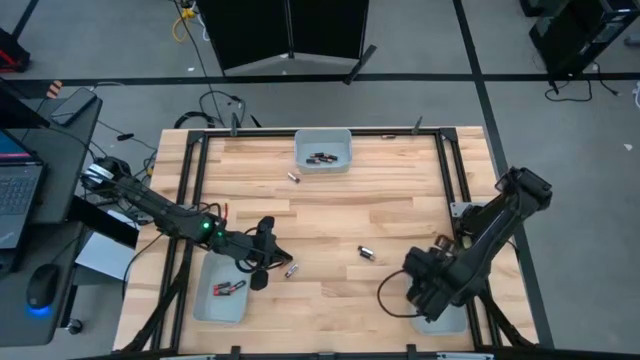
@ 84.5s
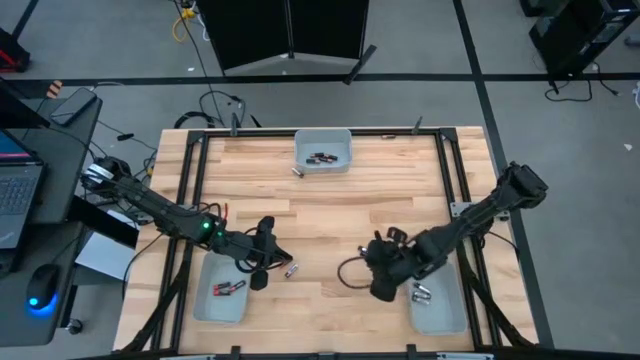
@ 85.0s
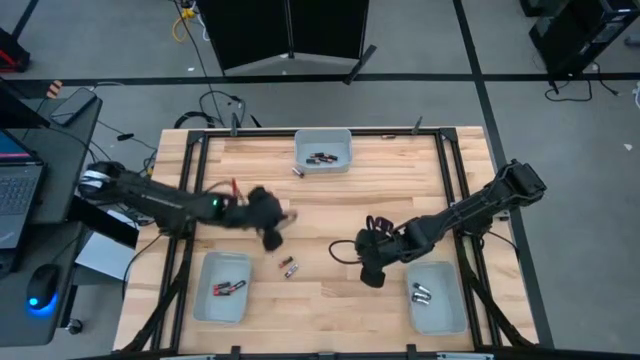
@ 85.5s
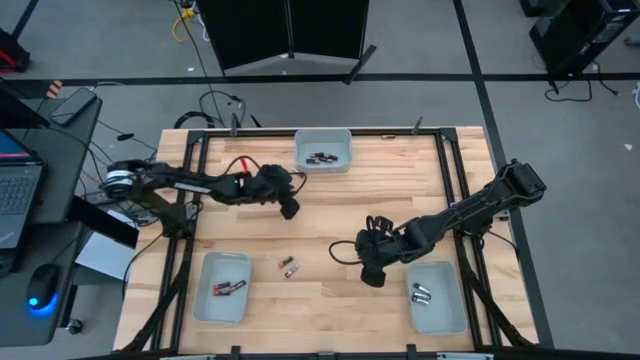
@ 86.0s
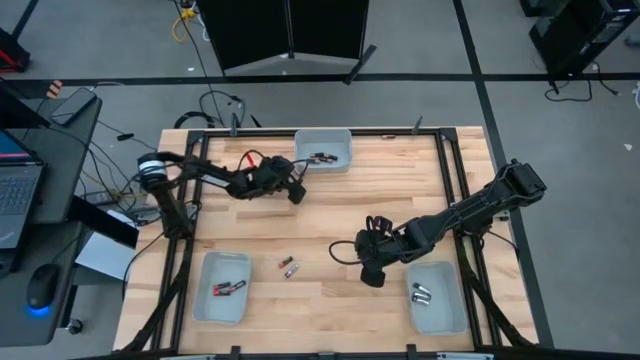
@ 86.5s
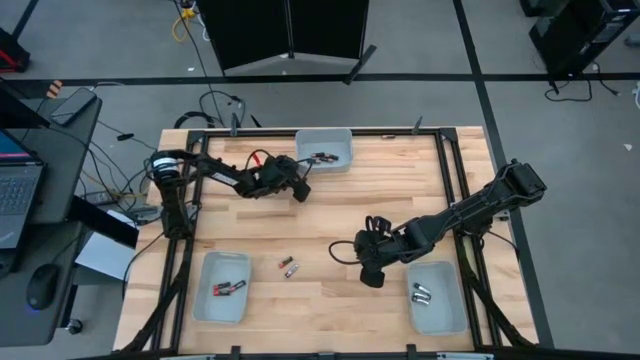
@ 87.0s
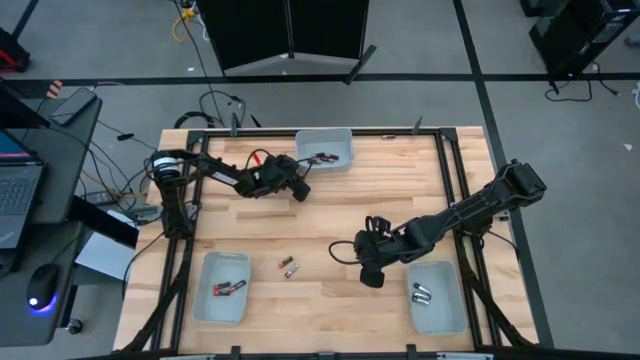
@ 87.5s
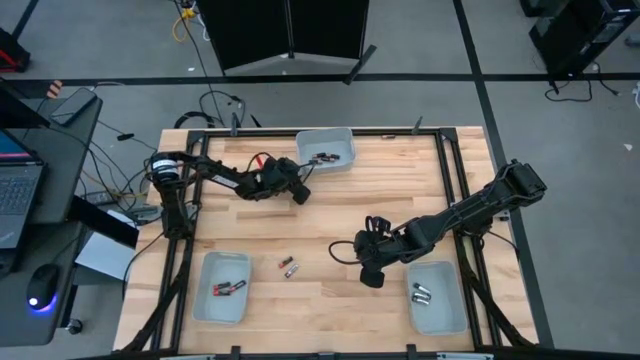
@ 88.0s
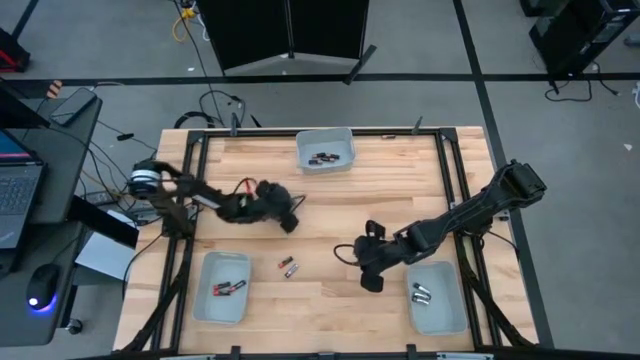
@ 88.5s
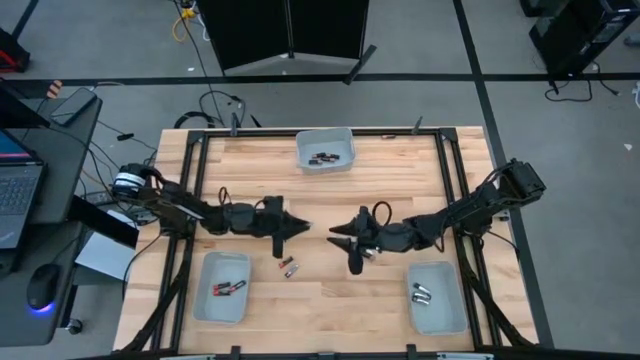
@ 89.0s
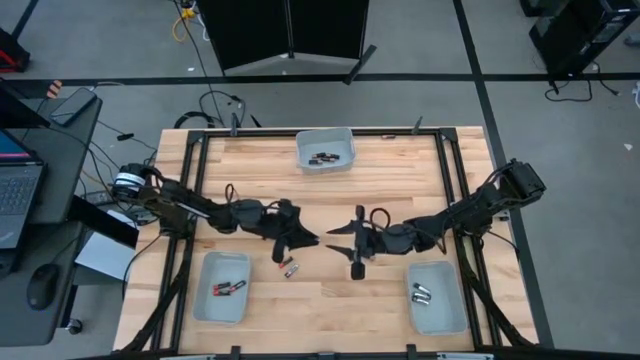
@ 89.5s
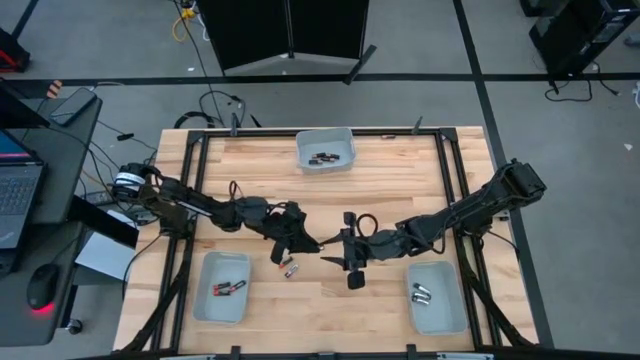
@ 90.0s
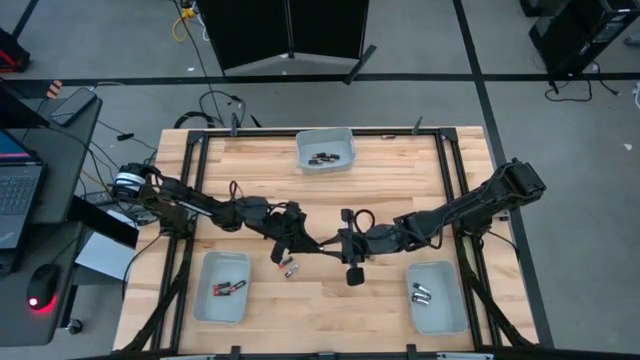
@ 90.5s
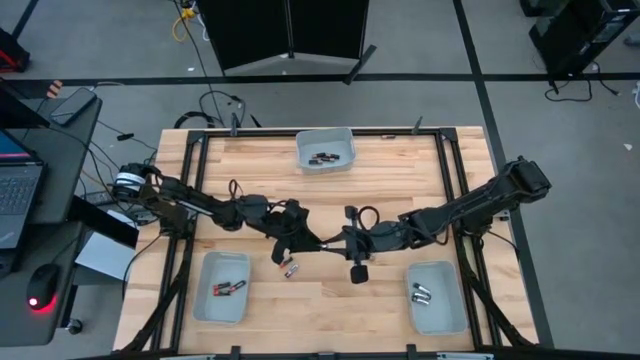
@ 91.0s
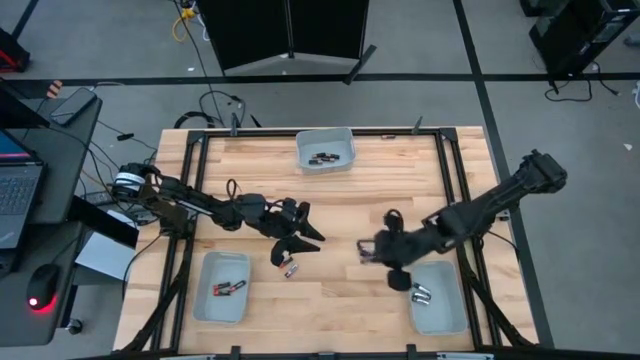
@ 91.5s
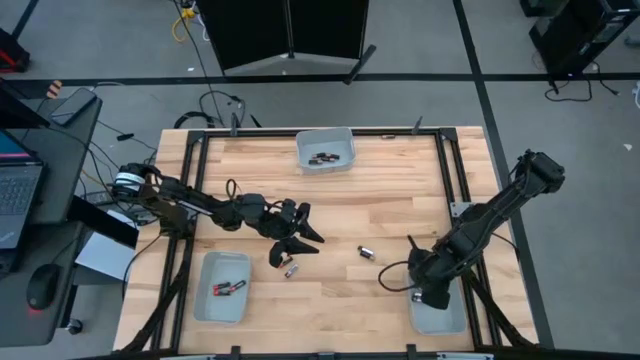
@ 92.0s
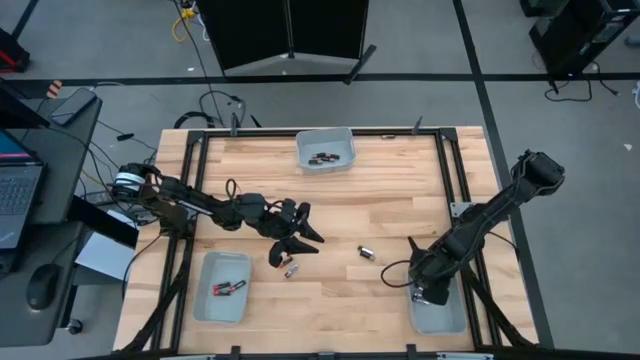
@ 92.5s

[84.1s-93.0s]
Task: Sort batteries
Put the silver battery into the bottom right gray bin

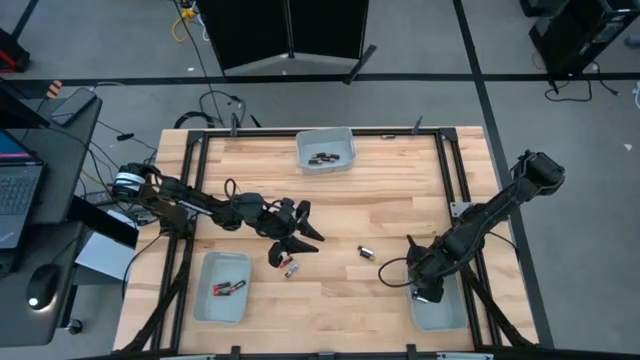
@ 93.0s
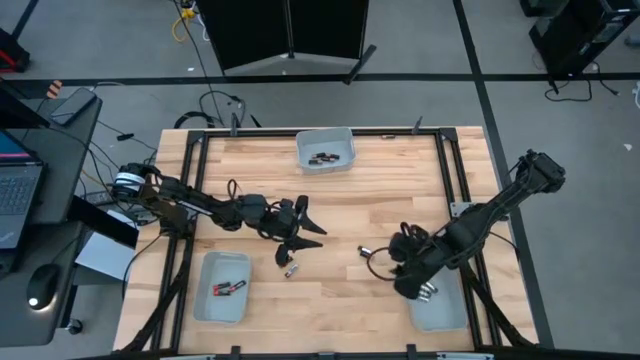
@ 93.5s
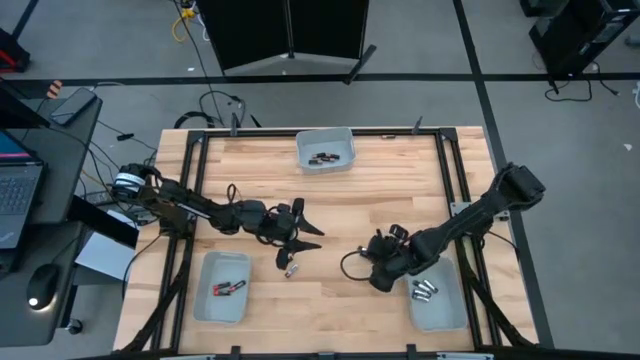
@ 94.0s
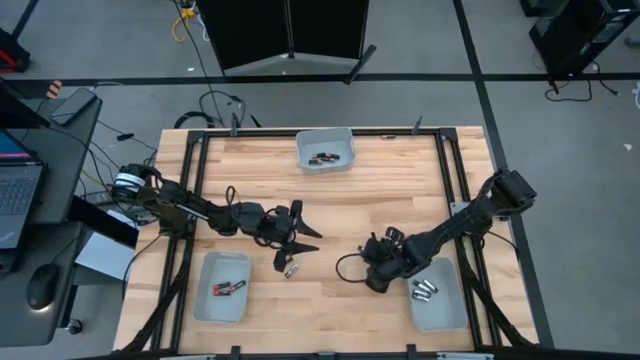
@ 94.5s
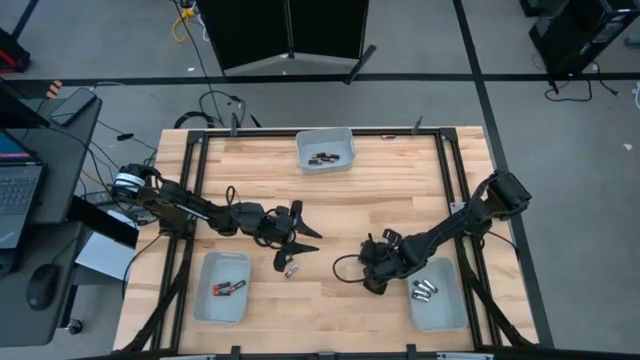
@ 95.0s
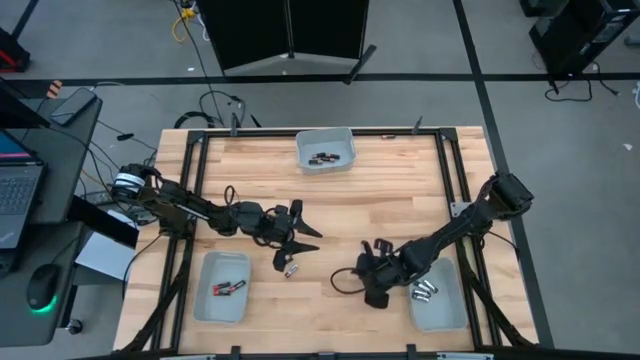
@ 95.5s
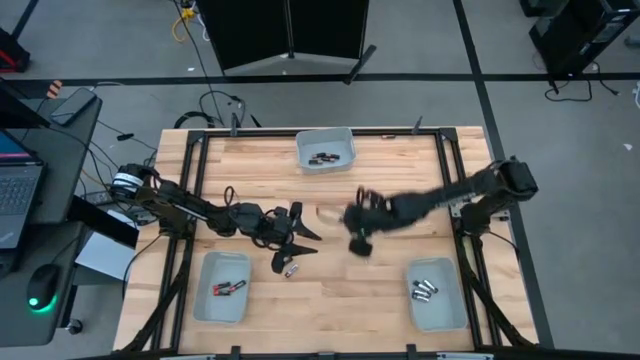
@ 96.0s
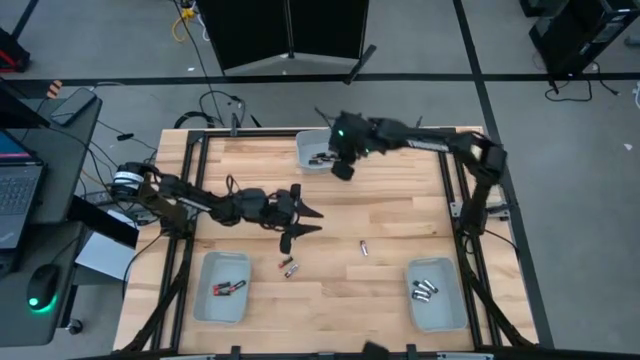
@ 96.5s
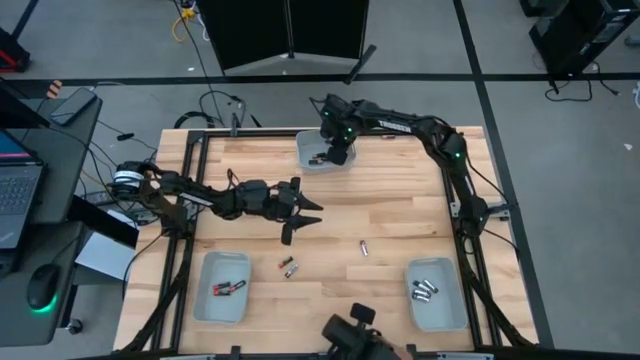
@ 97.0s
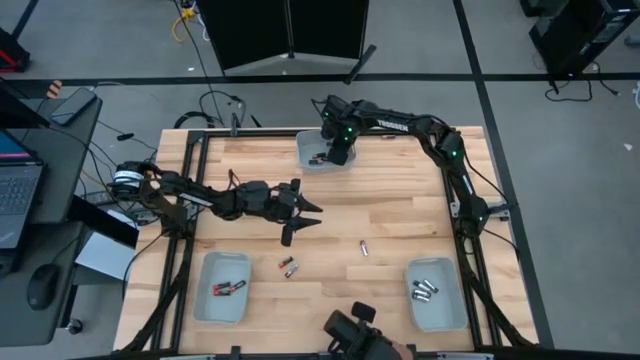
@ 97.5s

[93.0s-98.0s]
Put the copper battery into the top gray bin

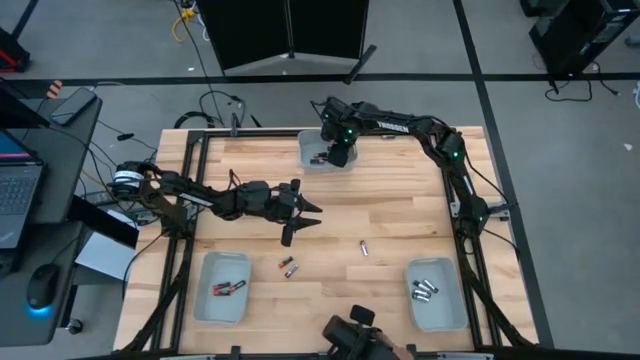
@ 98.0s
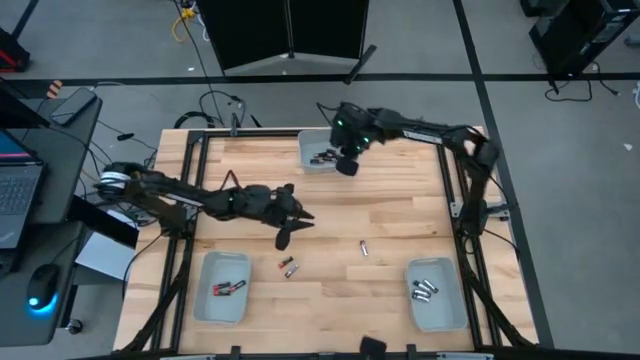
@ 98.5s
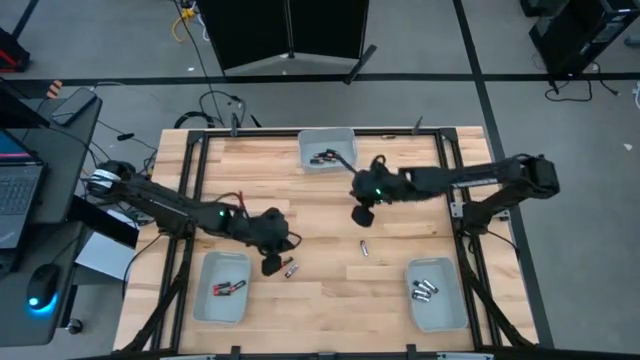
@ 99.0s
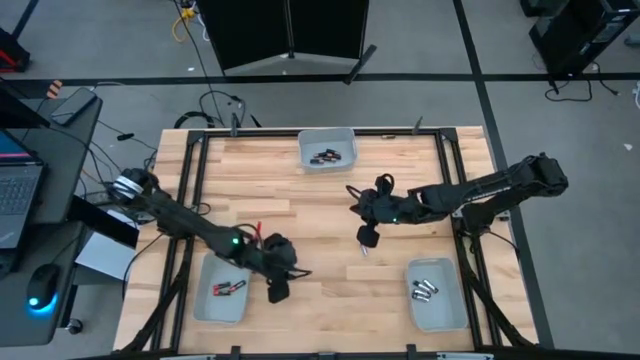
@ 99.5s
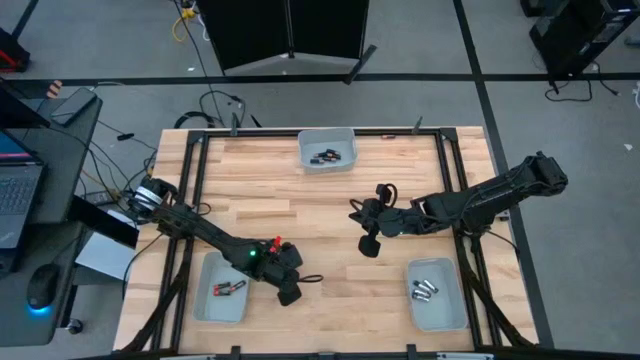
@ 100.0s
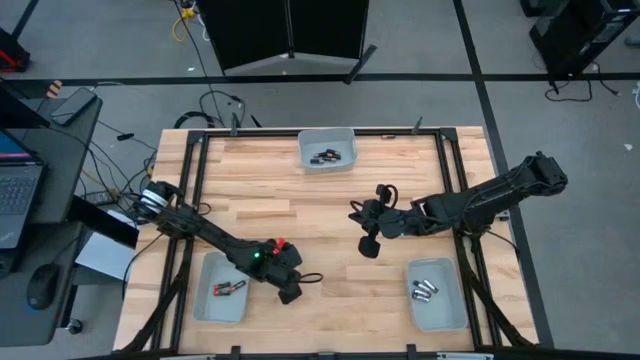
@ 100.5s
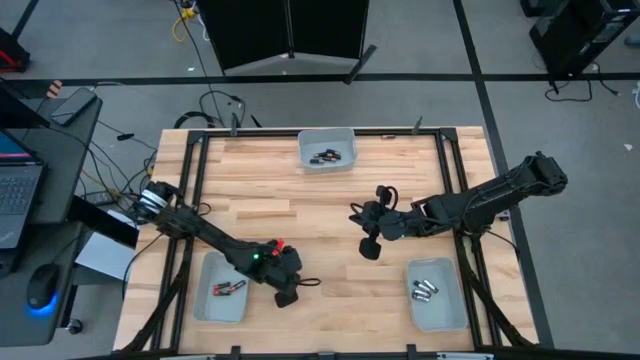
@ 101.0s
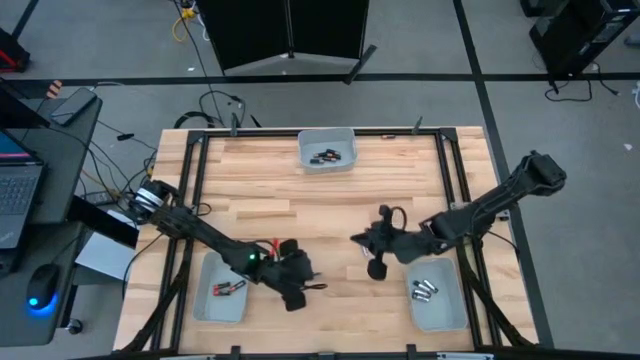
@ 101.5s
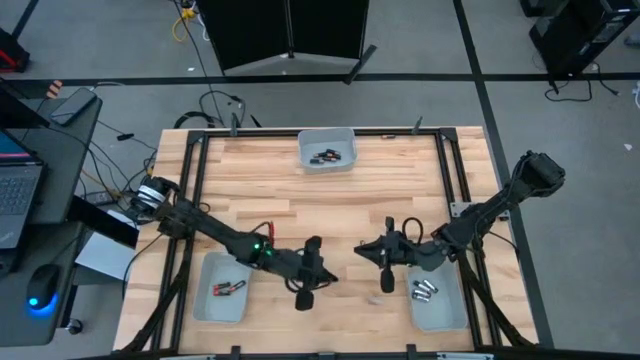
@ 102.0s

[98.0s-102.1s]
Put the silver battery into the bottom right gray bin

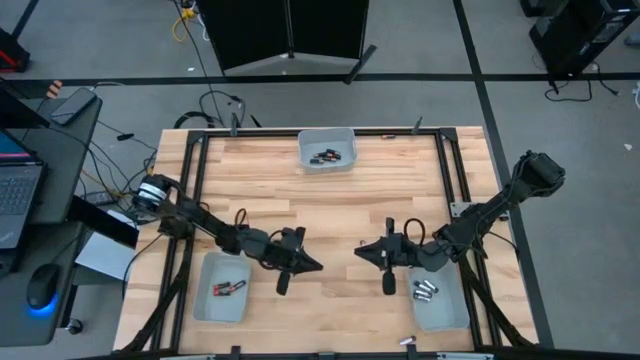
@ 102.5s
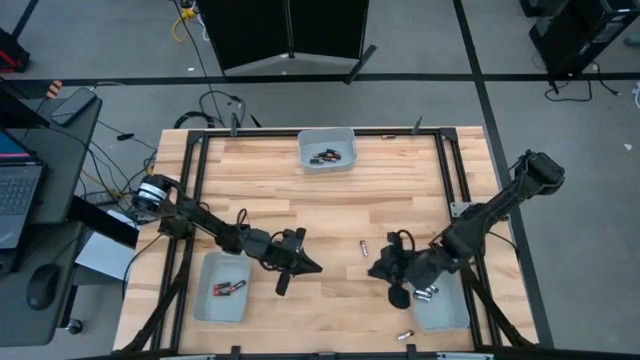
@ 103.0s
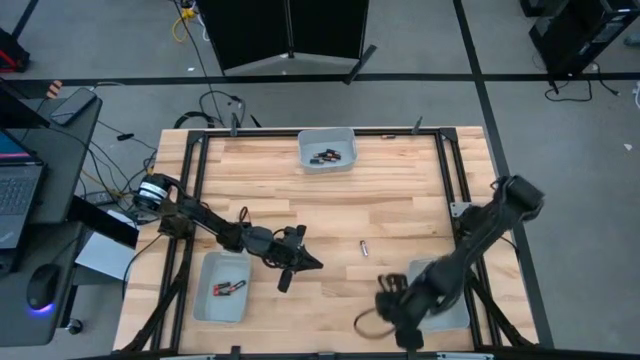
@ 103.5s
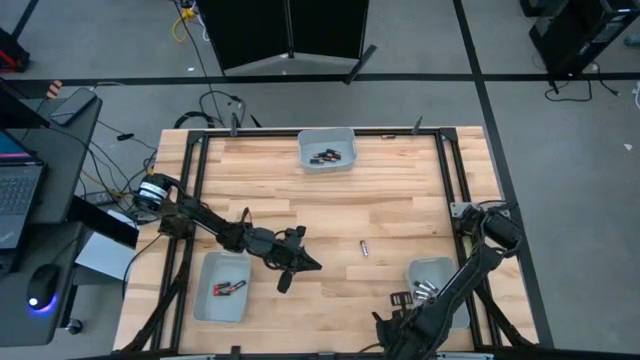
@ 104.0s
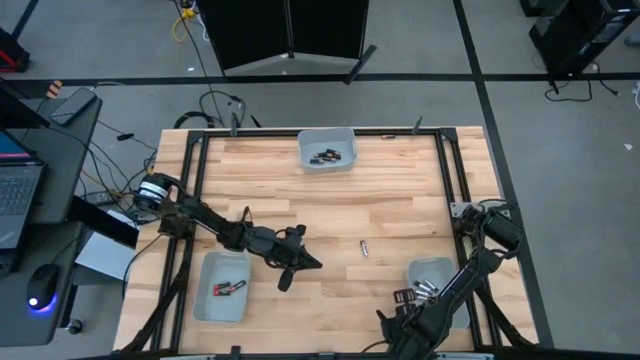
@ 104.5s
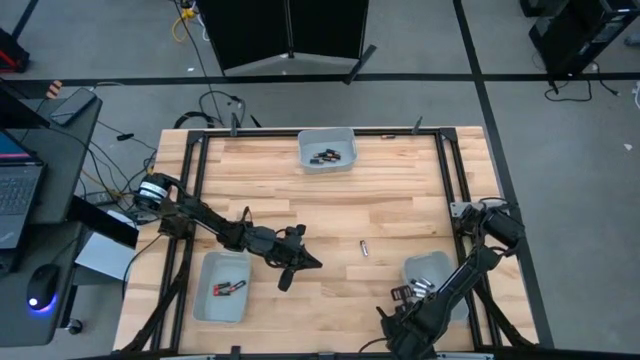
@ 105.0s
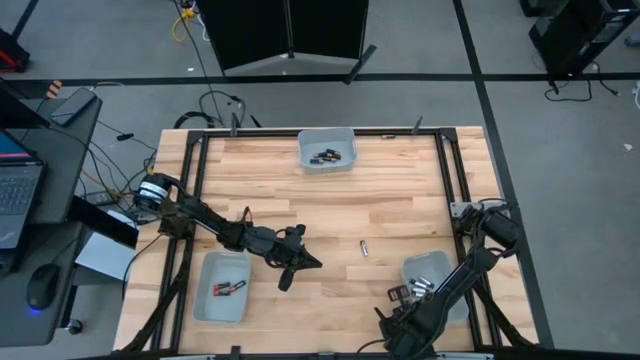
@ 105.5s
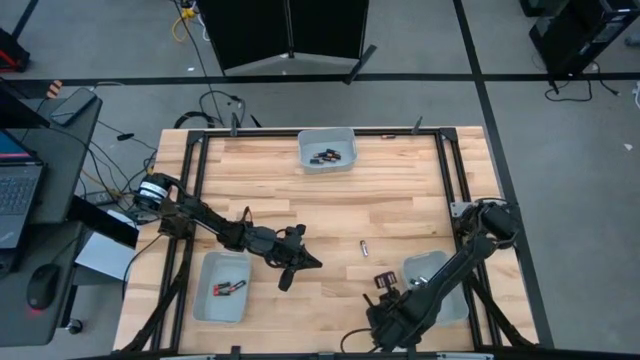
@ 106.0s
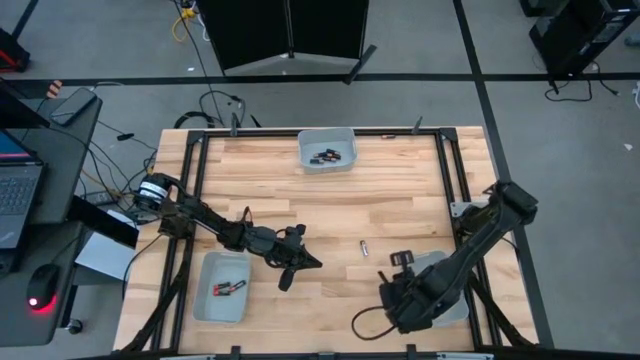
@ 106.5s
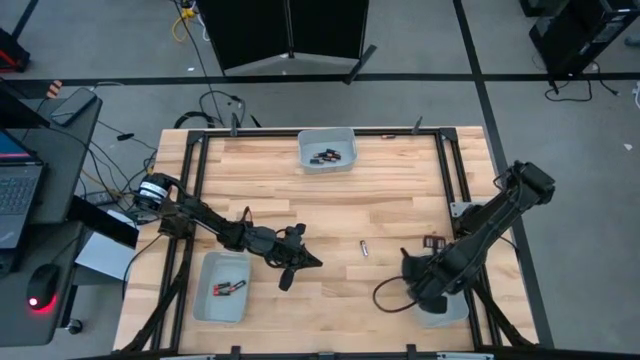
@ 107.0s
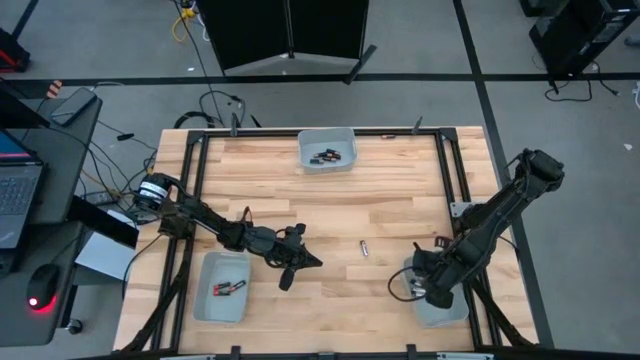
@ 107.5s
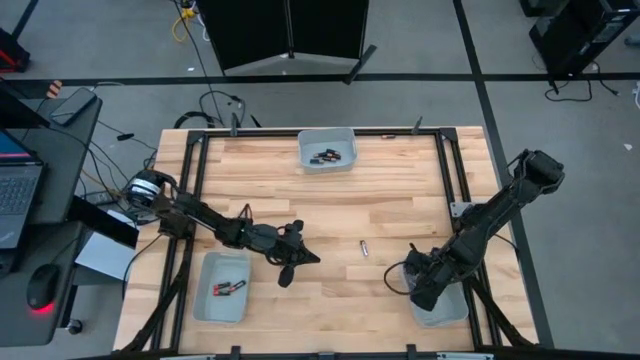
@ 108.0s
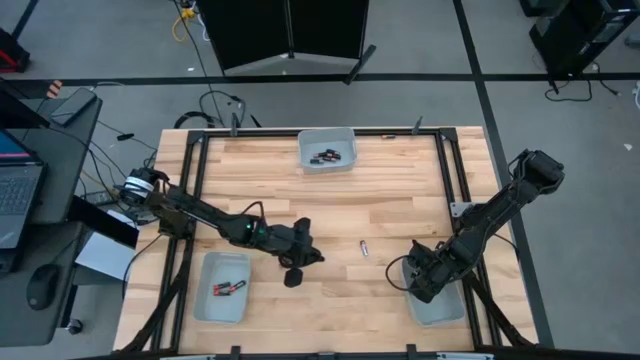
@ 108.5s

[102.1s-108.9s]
Put the silver battery into the bottom right gray bin
